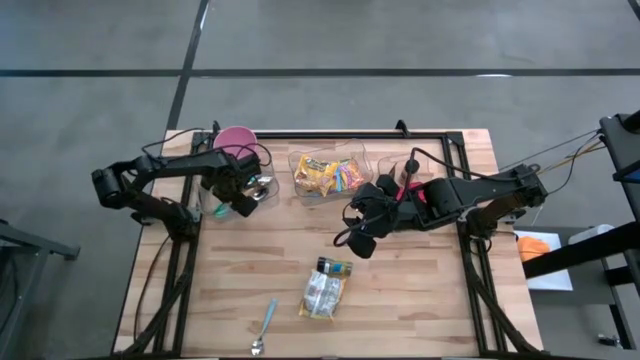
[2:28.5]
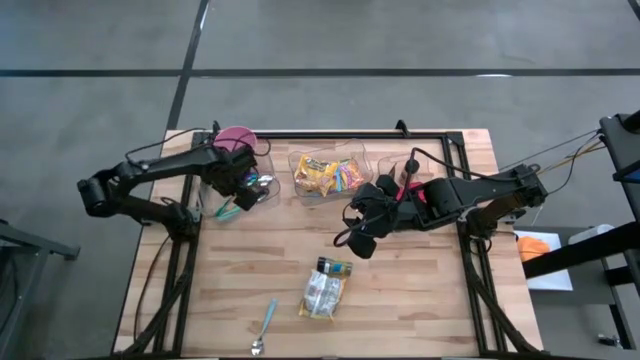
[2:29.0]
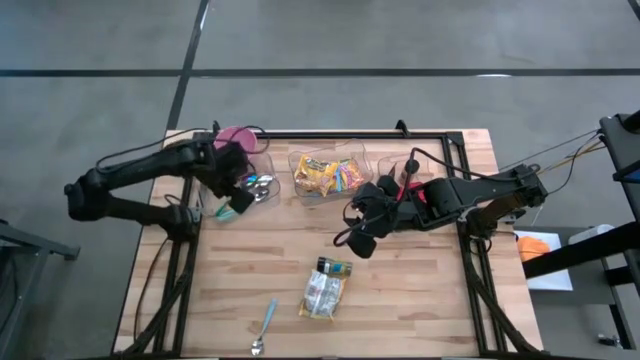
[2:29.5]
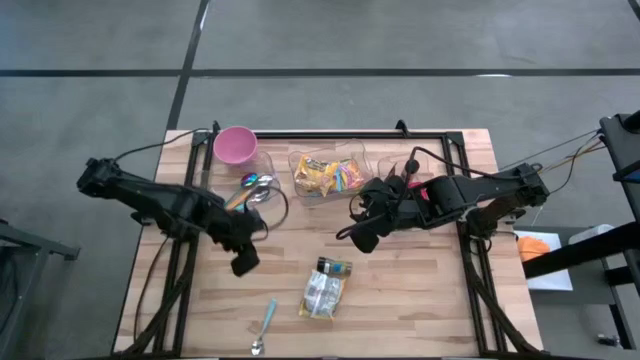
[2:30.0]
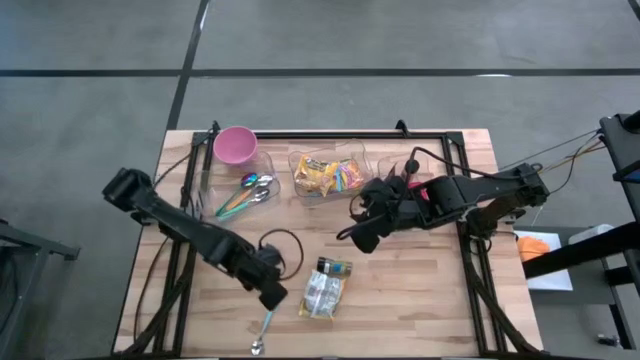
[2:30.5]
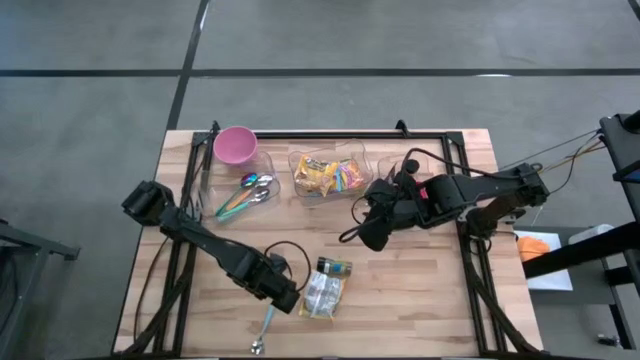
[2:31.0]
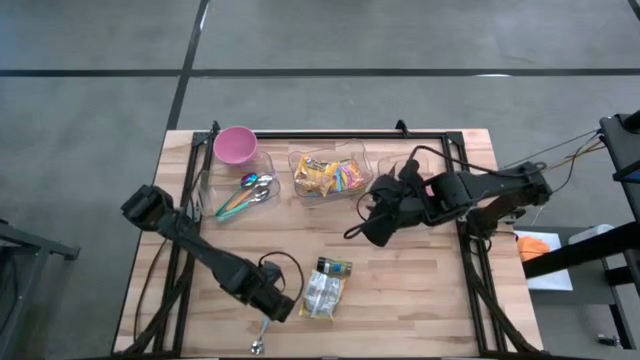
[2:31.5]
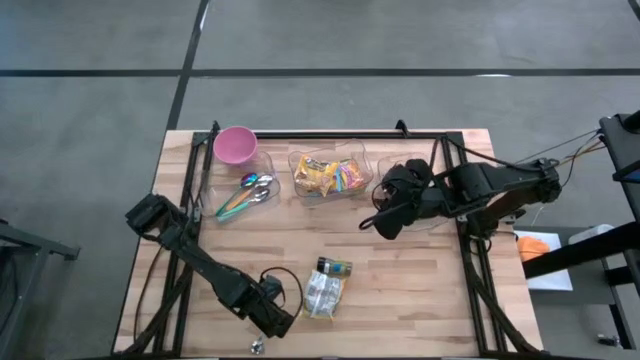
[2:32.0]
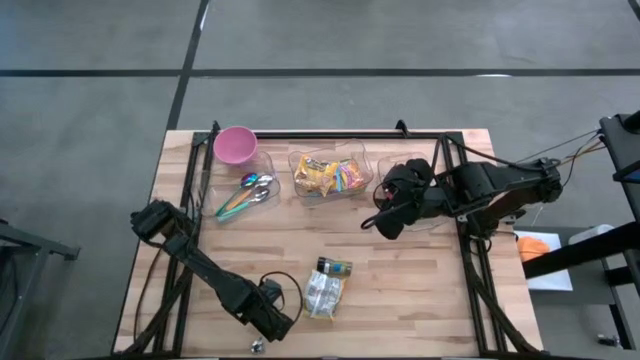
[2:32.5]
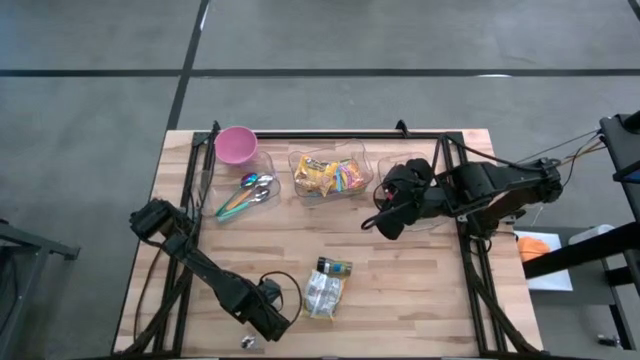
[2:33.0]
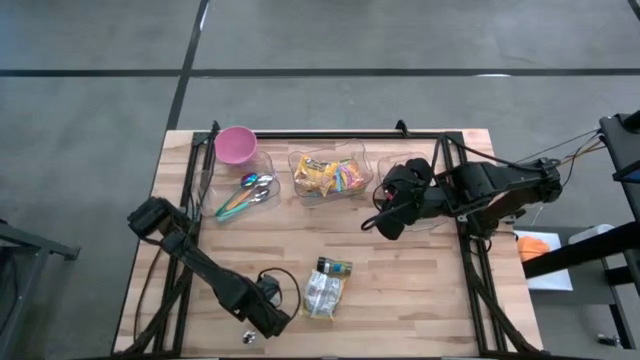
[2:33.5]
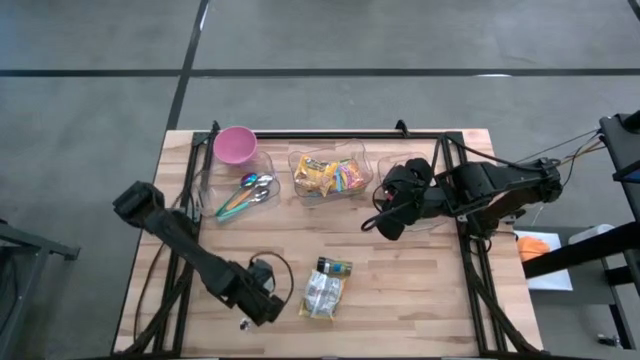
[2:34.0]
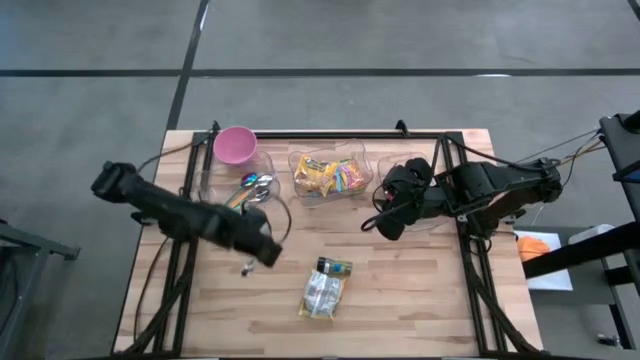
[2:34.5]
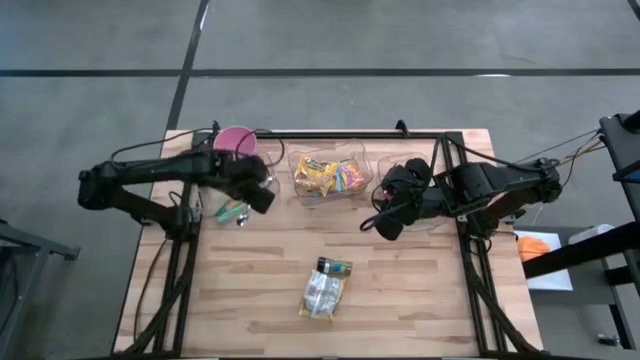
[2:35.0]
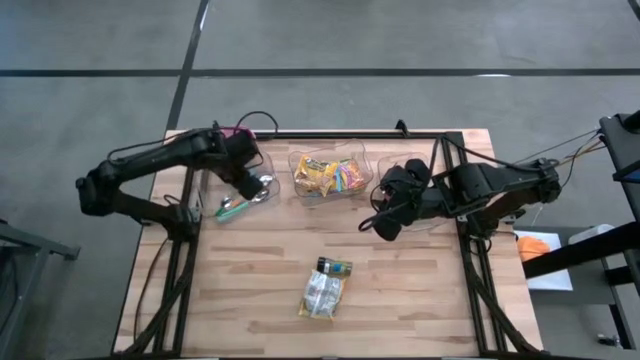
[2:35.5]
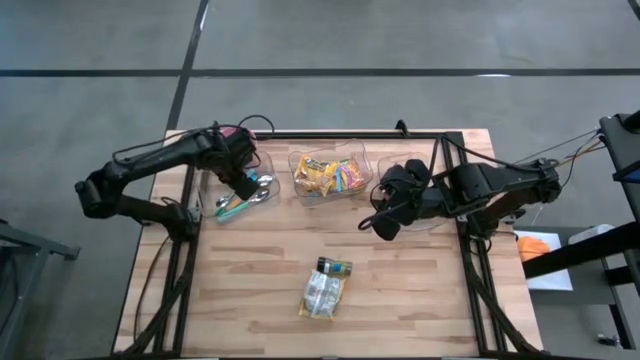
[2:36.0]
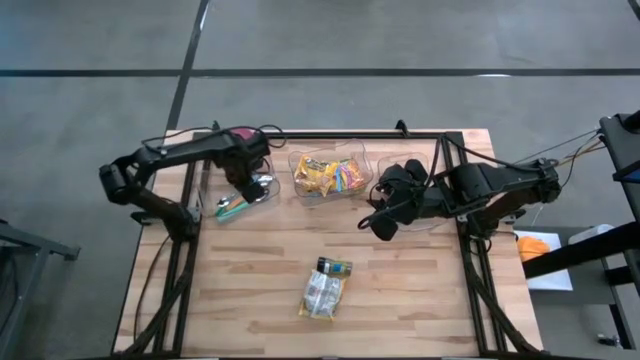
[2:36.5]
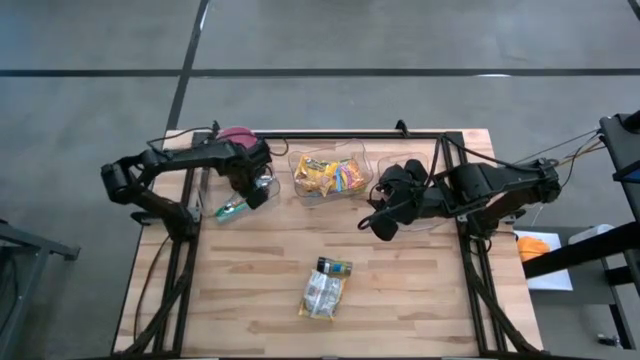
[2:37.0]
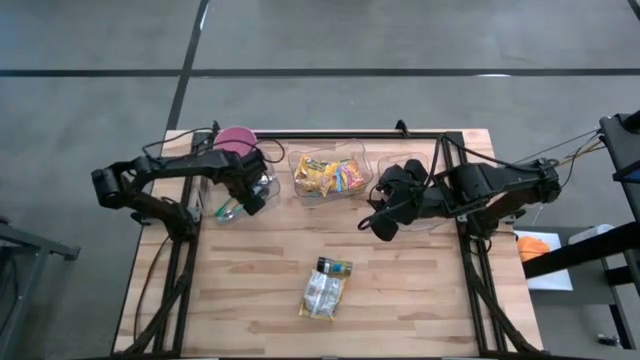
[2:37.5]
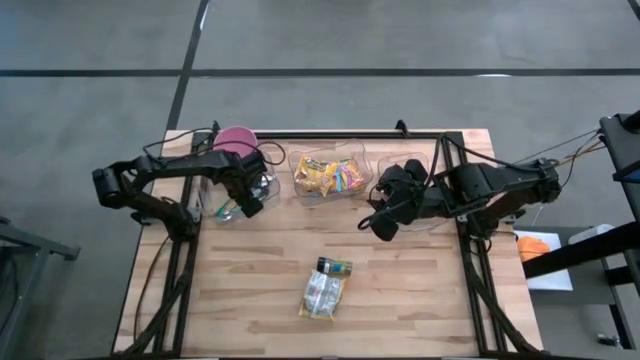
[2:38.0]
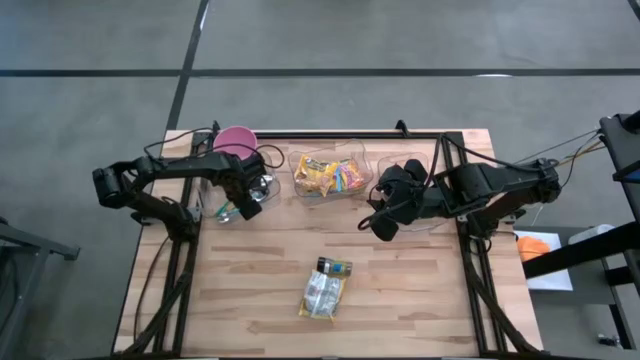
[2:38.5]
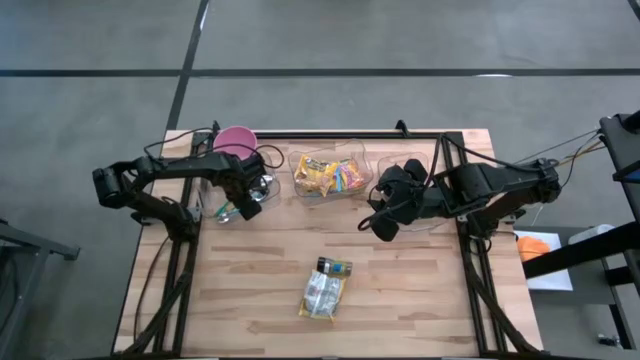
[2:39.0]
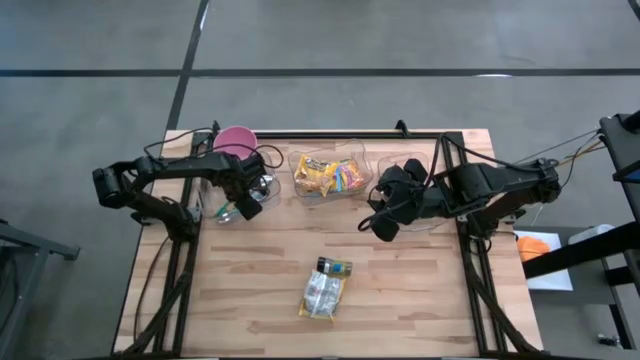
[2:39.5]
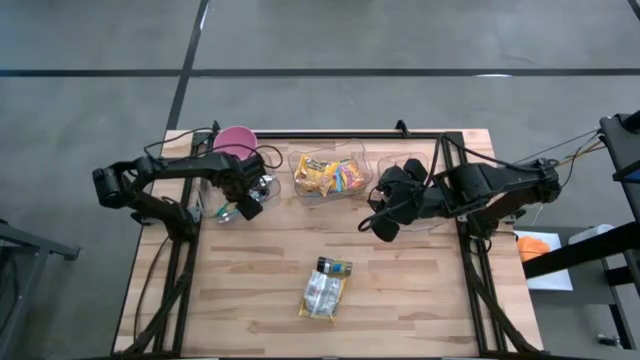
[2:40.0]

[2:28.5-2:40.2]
Put the blue spoon into the left transparent bin

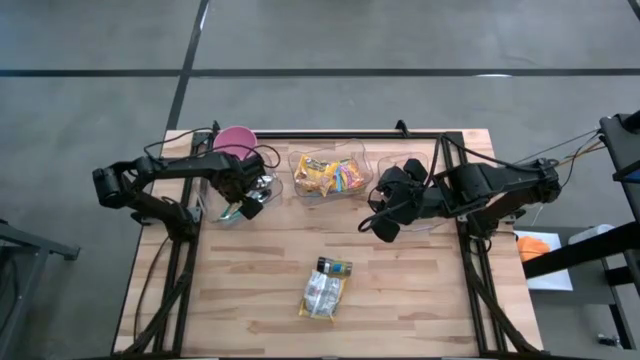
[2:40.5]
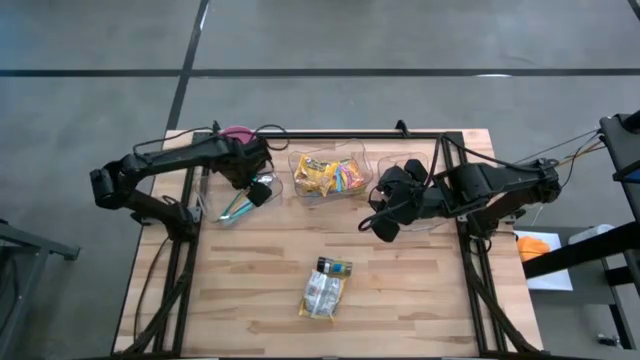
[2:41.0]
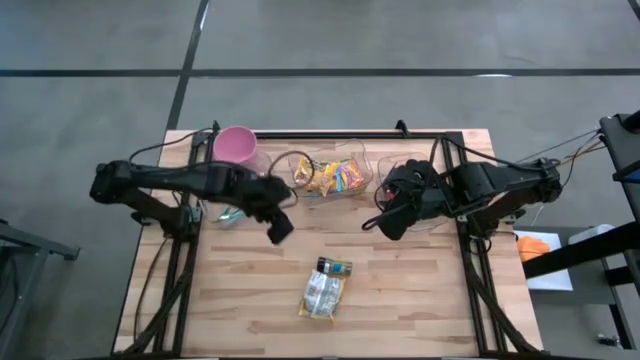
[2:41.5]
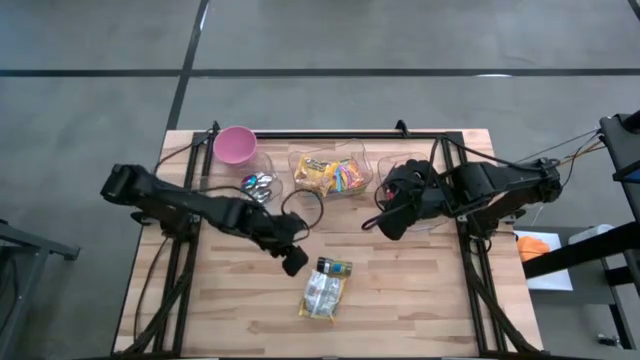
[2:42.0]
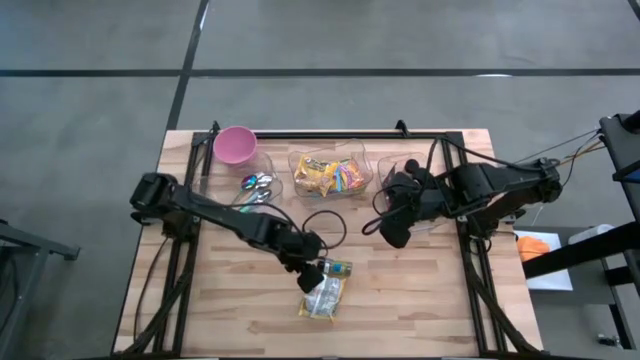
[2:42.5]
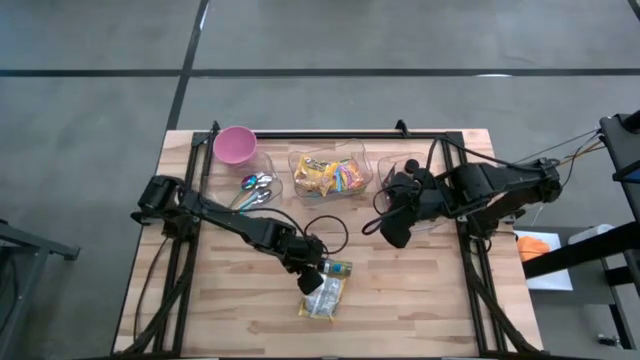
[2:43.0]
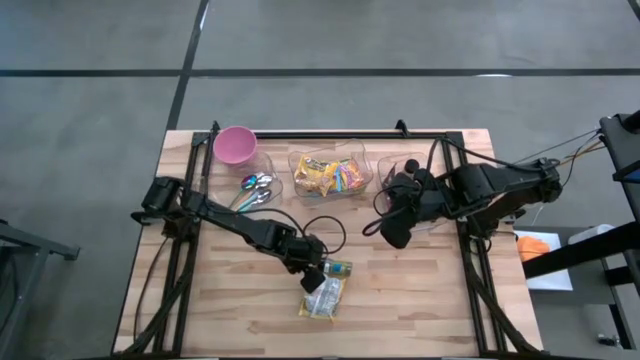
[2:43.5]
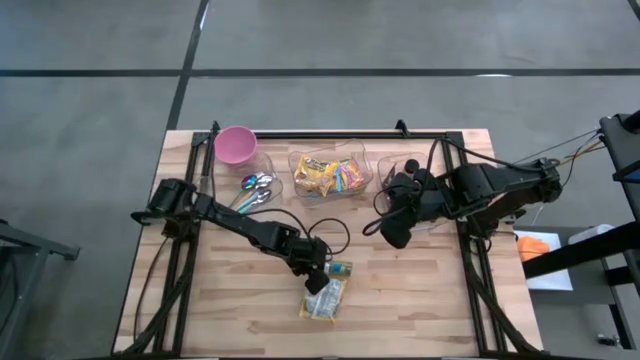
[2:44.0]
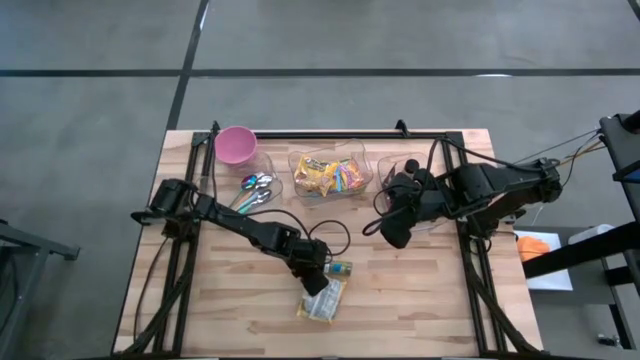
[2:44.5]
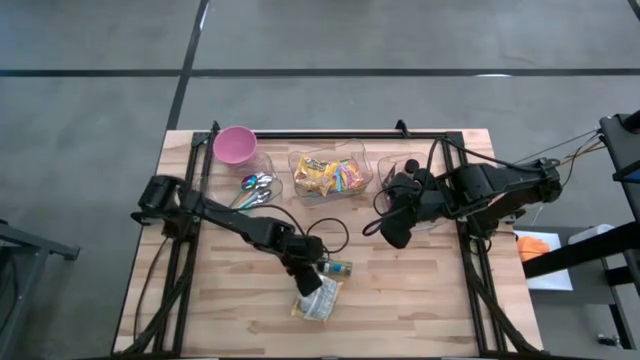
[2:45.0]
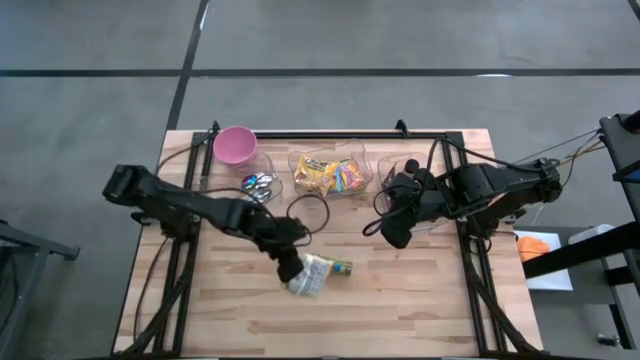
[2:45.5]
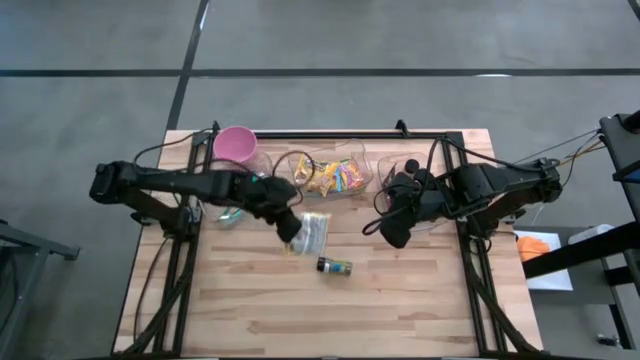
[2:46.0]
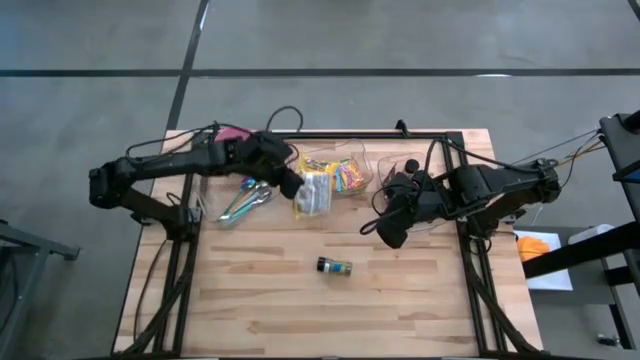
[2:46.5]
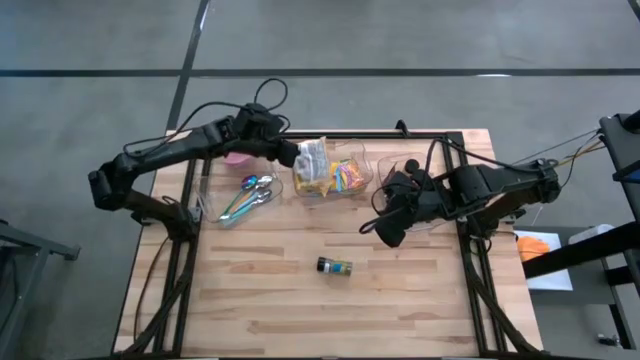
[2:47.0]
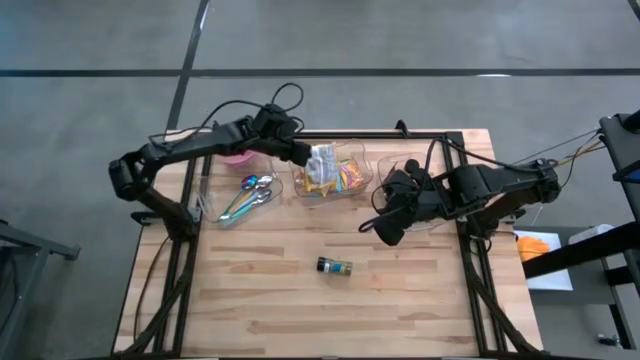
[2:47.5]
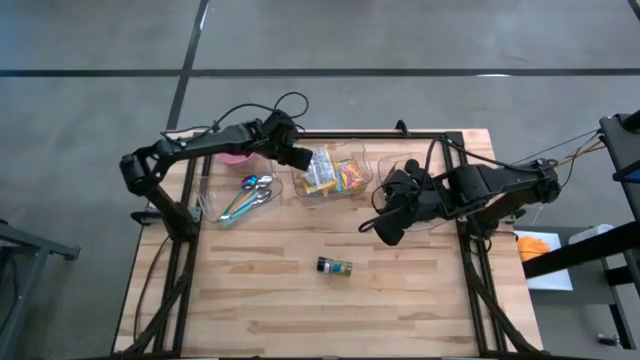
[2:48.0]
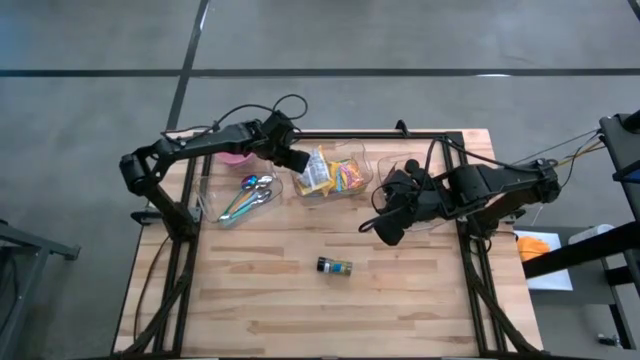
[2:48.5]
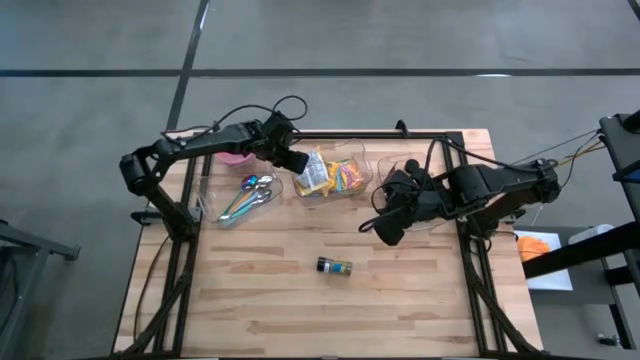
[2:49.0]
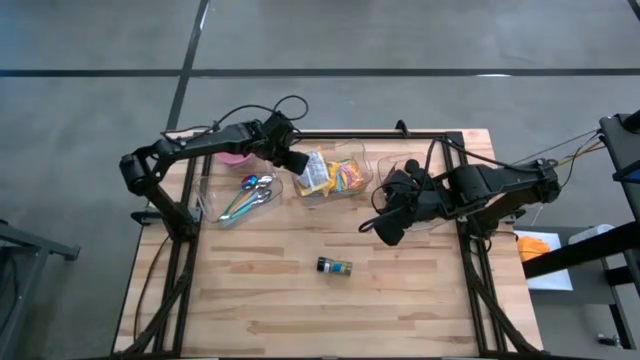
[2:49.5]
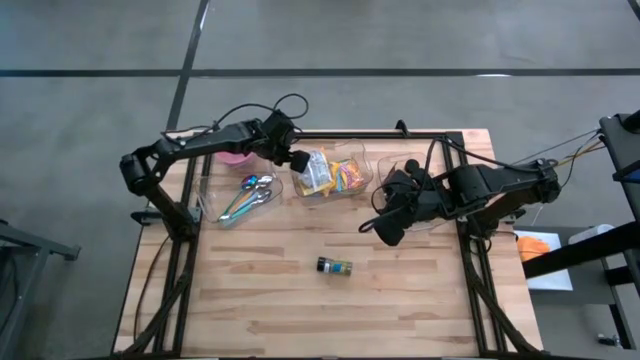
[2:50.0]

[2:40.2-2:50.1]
Put the yellow noodle pack into the middle transparent bin
